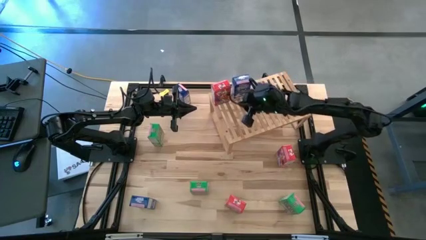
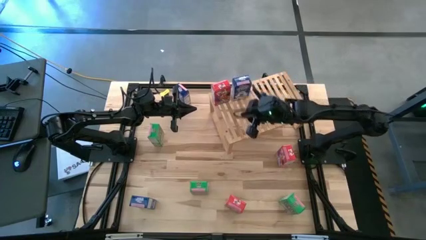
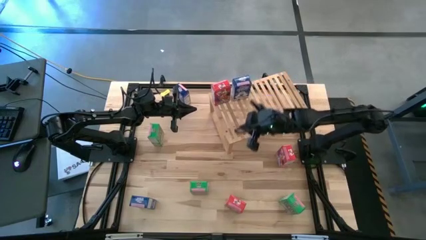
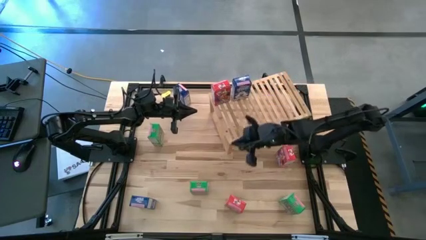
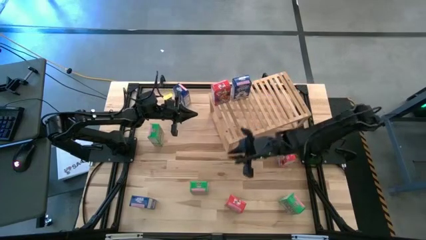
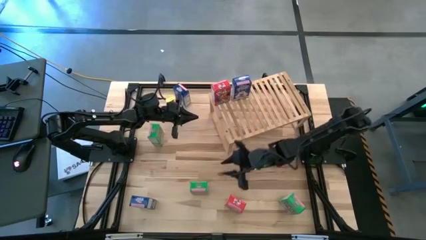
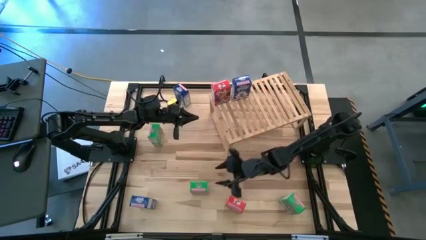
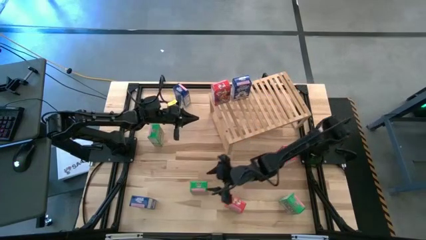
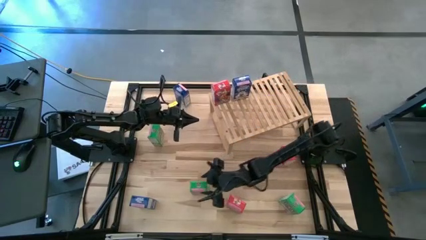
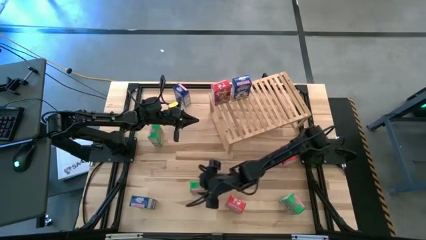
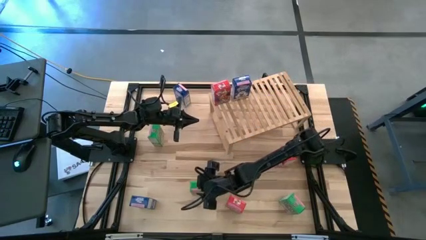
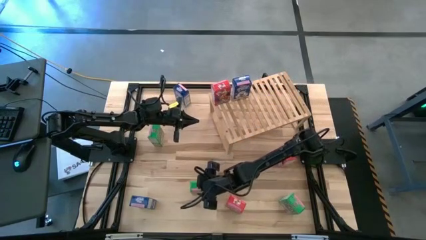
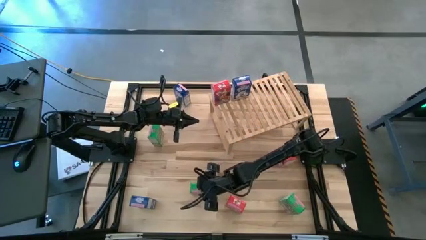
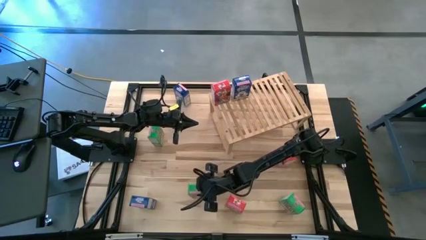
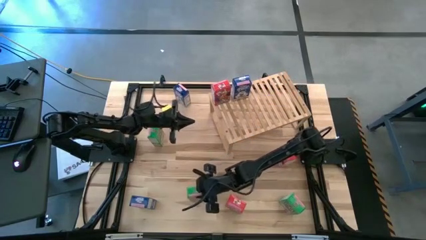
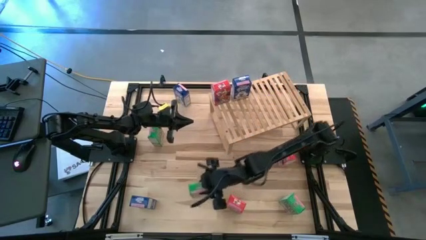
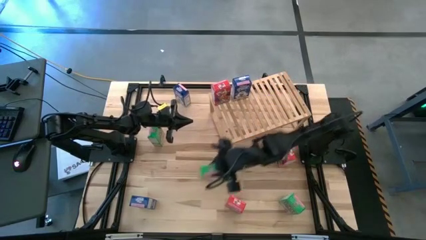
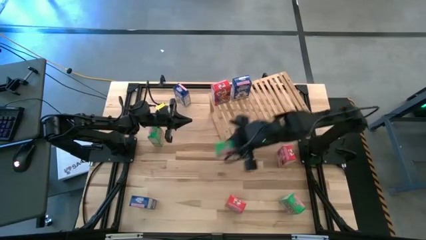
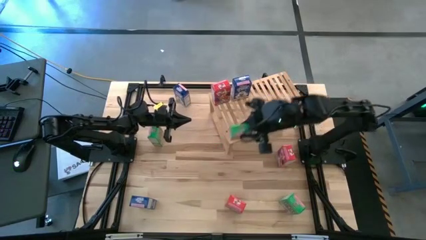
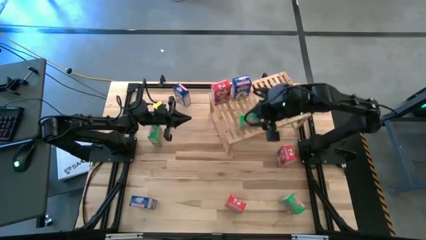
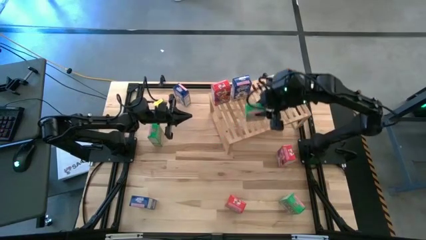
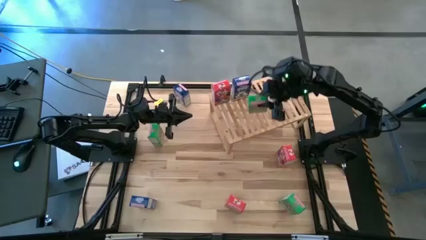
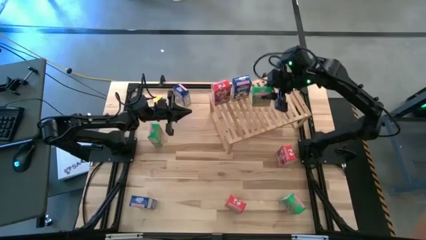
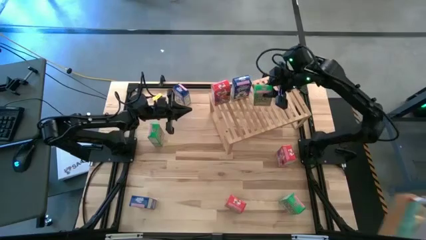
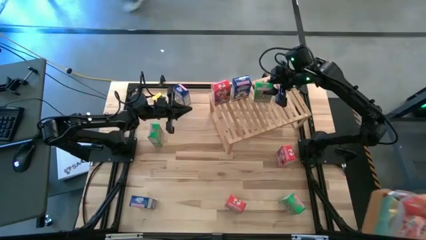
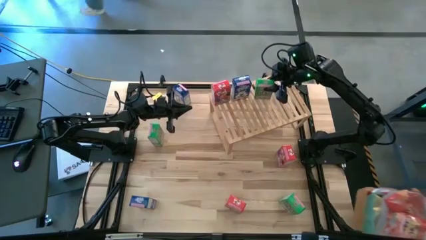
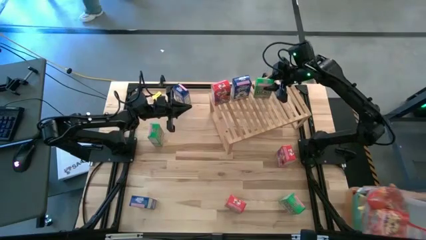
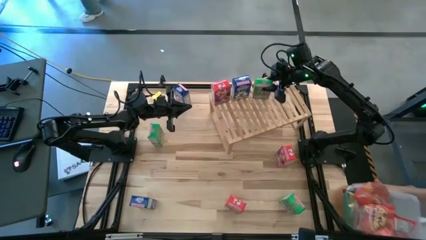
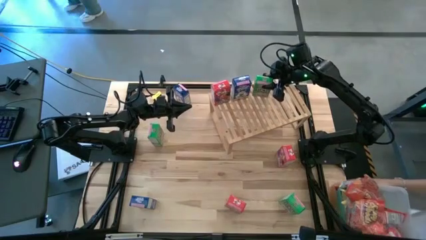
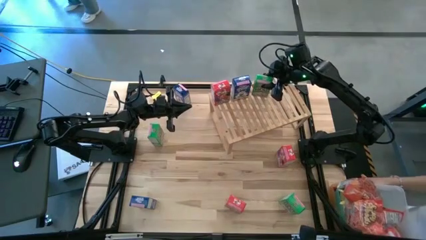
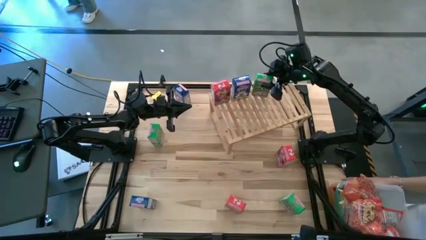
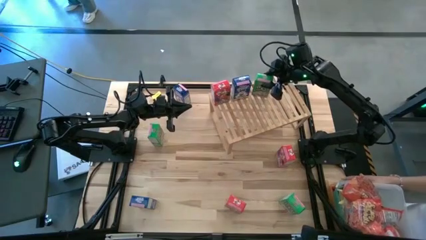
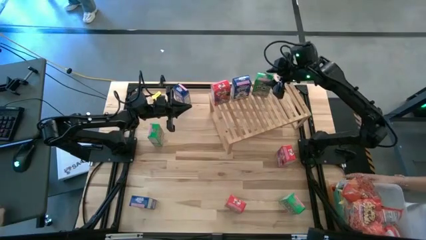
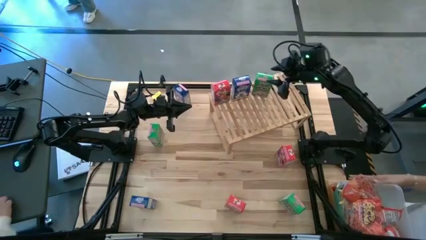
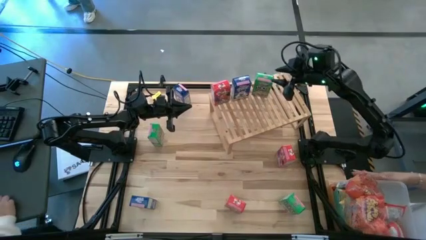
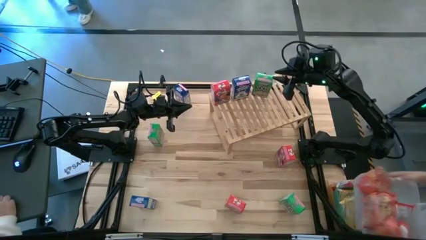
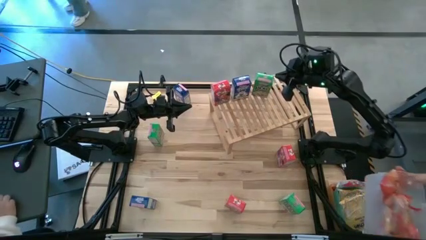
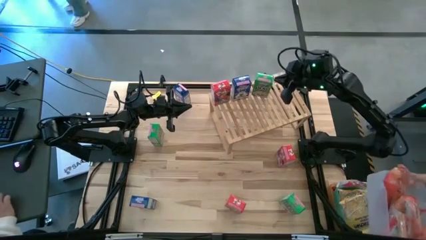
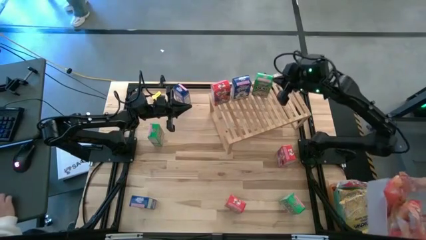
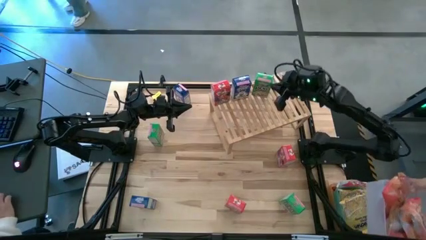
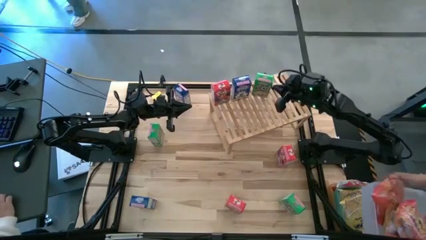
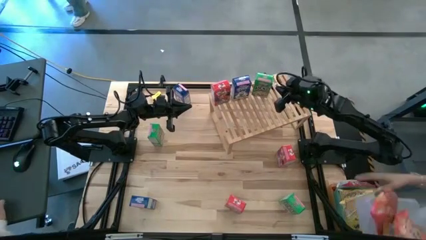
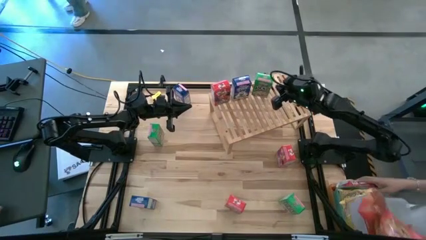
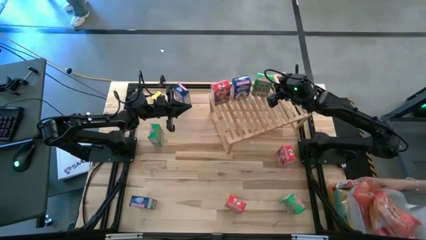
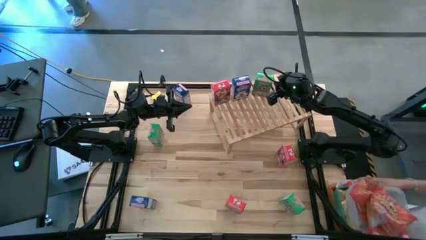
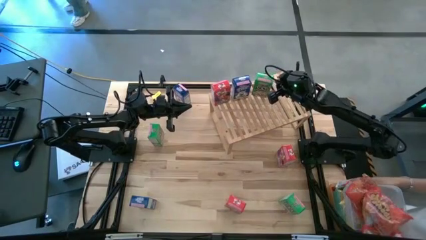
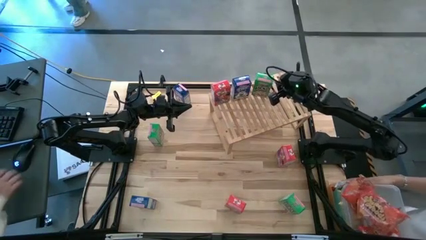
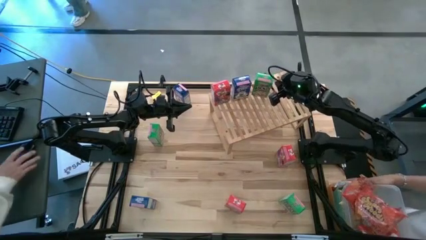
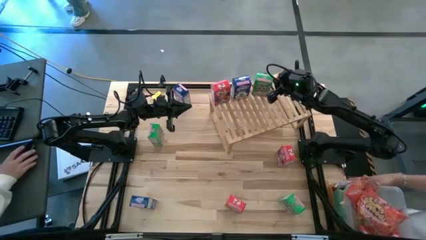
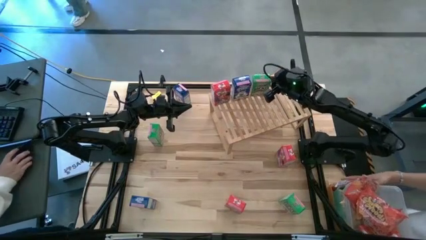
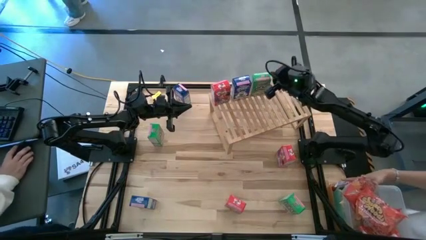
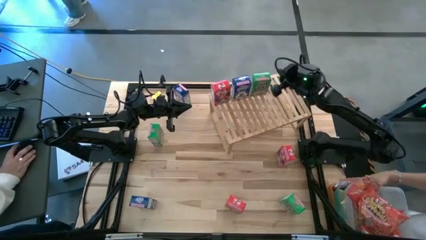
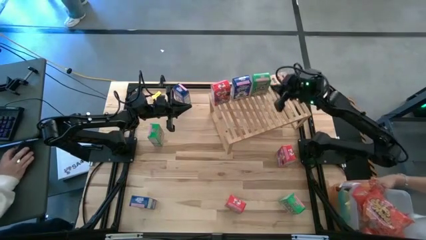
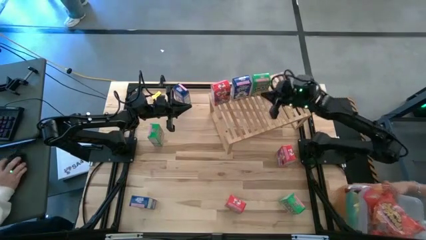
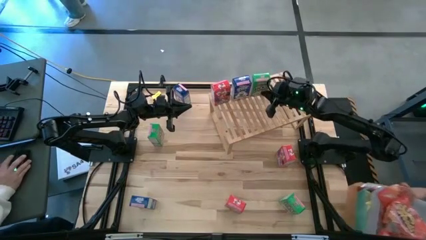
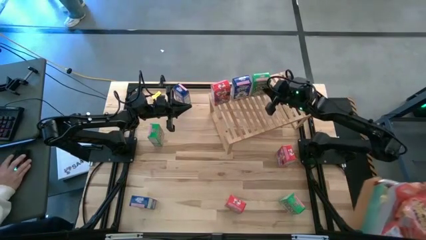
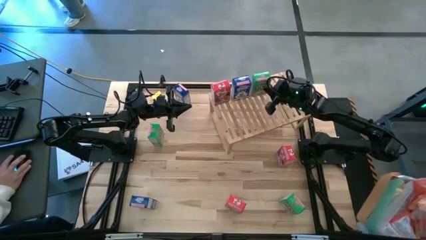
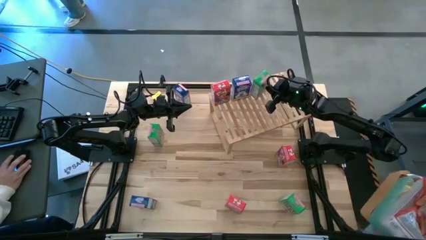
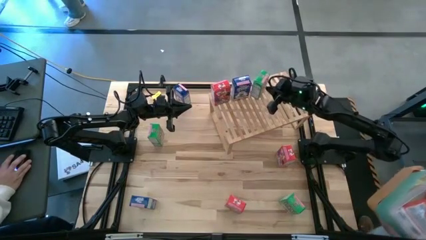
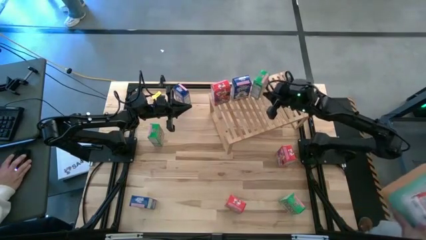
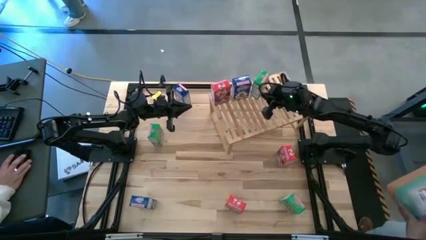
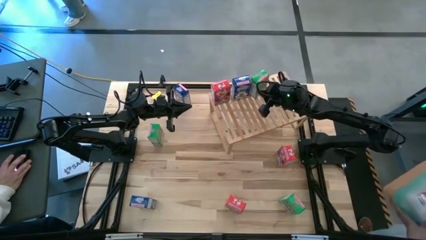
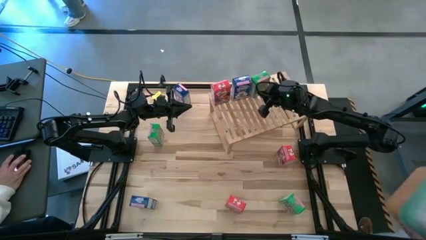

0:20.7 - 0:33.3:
Task: Stack cereal on shelf
Put the bottom left green cereal box on the shelf

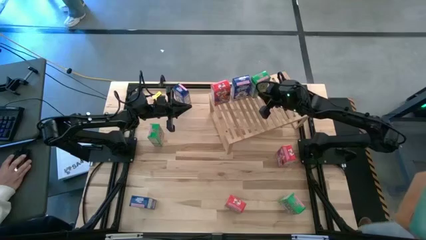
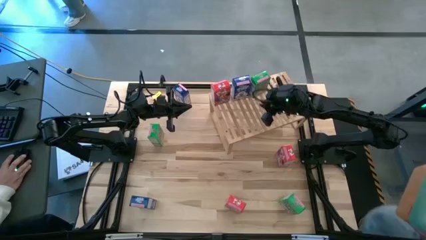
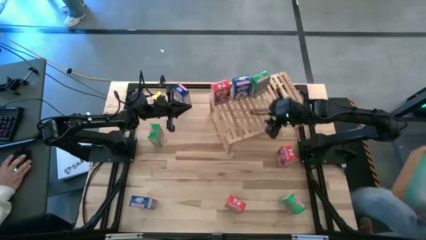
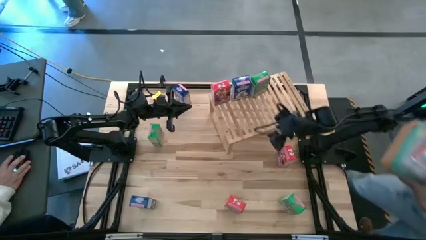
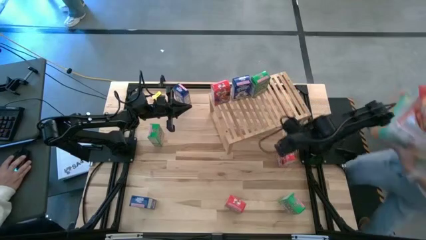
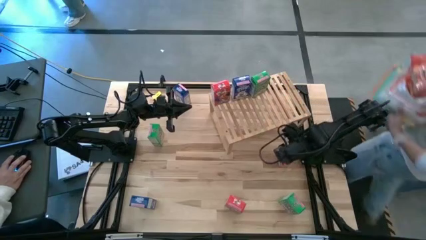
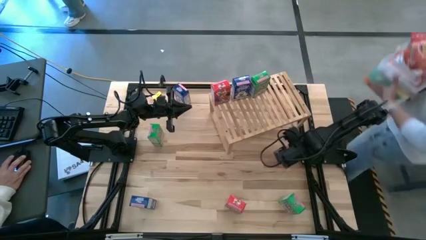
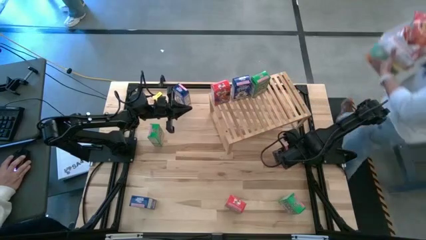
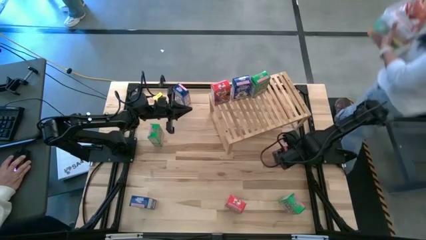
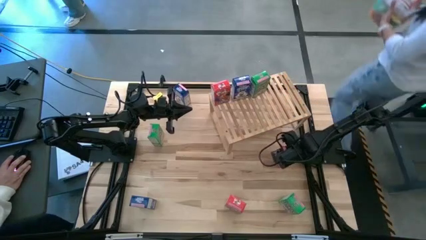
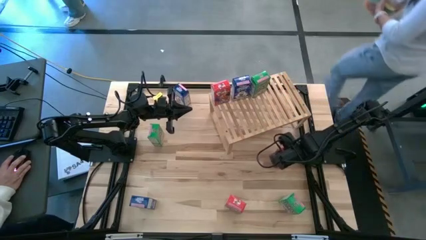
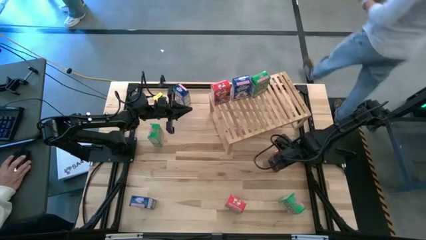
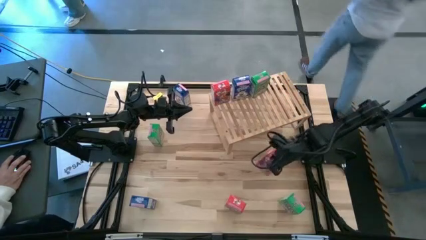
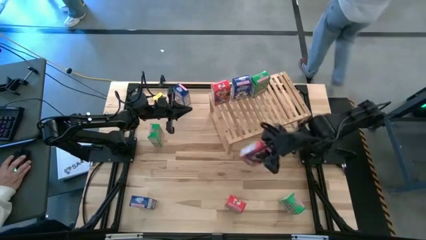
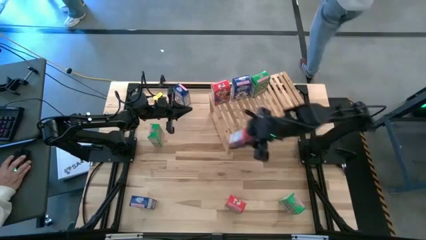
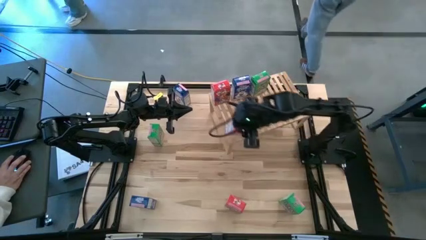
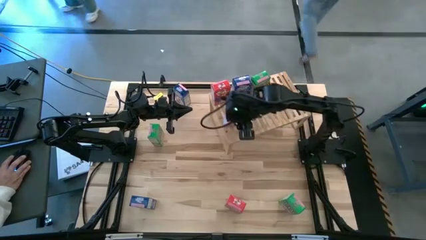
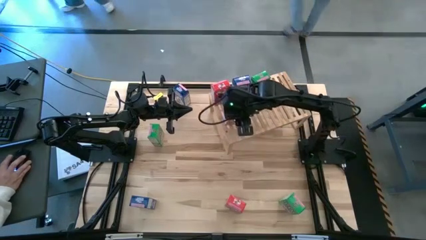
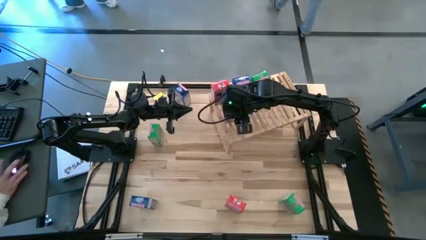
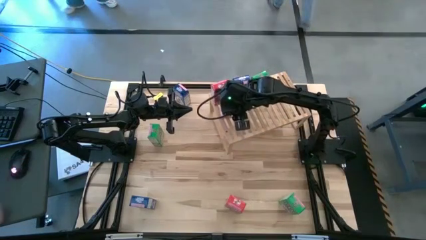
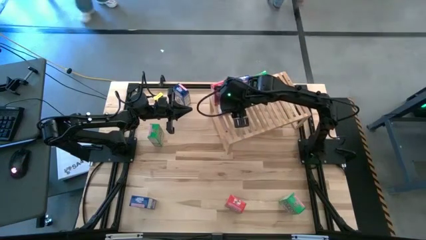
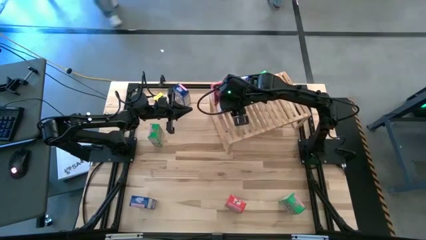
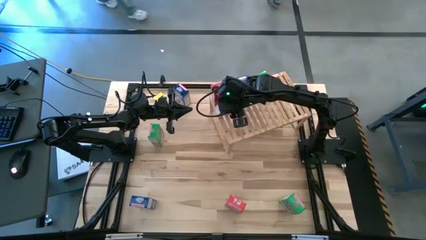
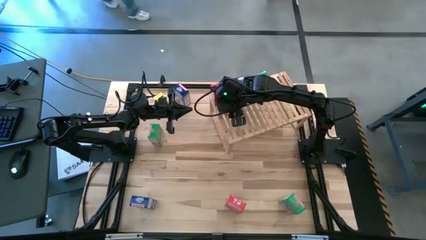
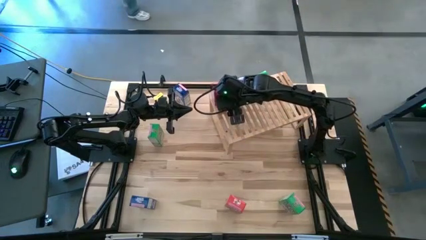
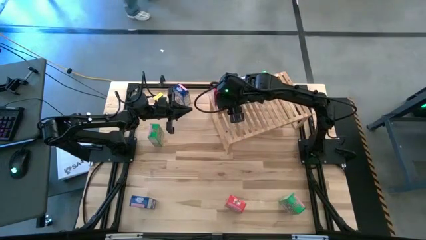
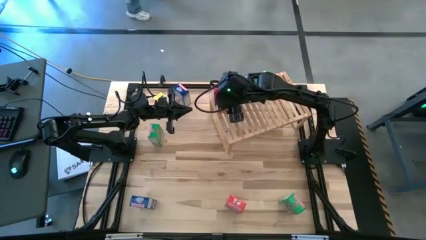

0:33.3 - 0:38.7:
Put the top red cereal box on the shelf aligned with the other red cereal box
